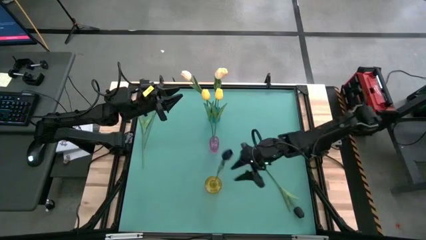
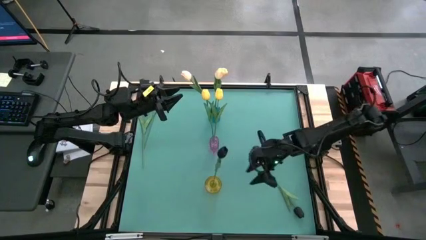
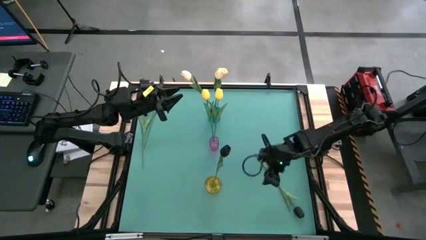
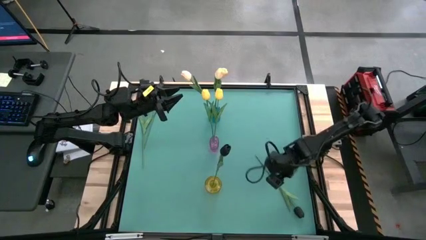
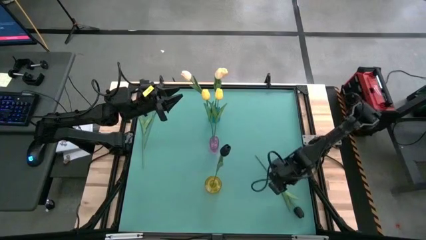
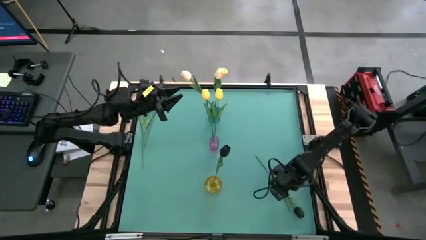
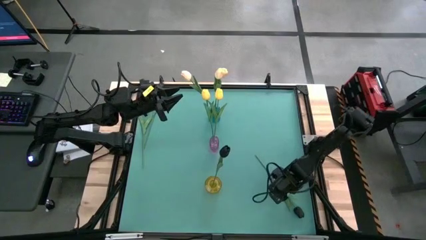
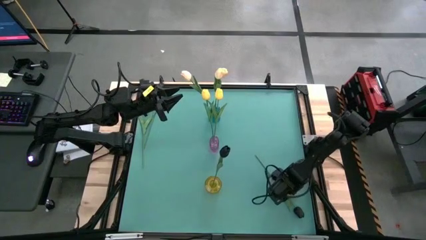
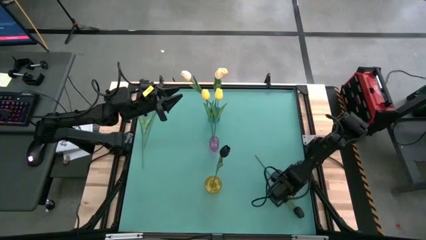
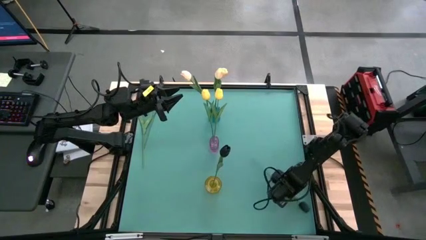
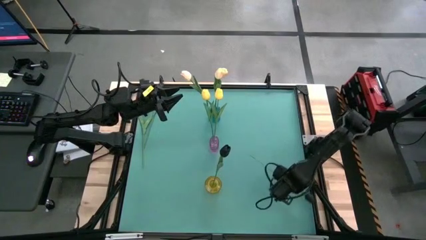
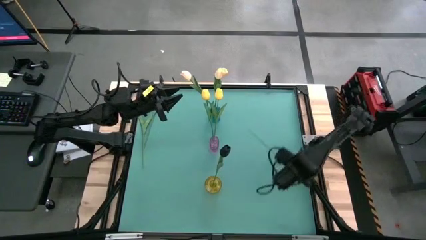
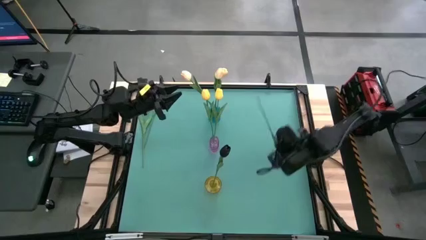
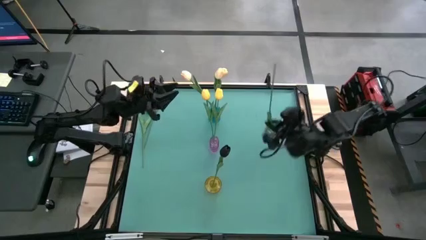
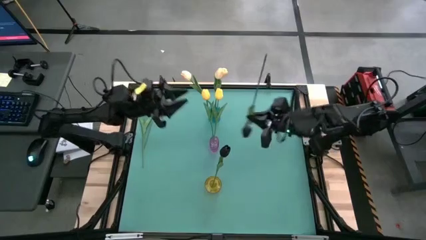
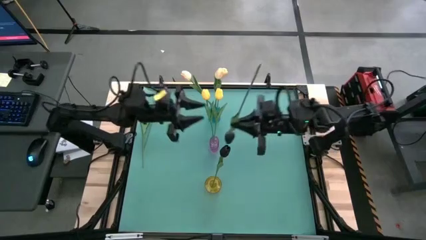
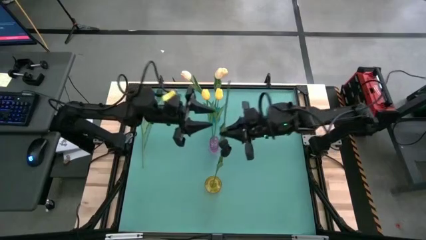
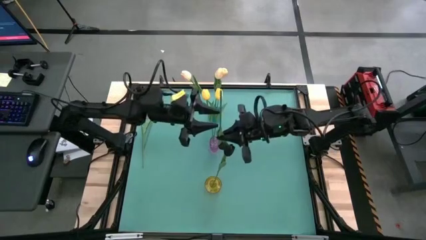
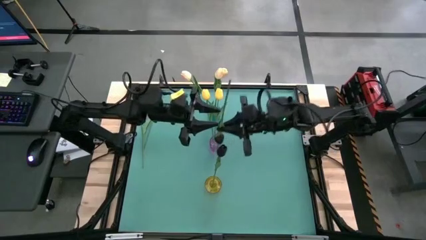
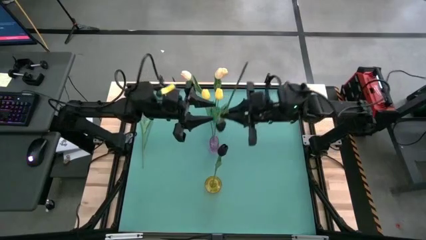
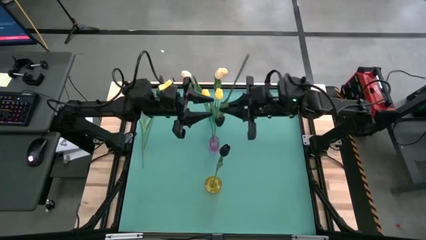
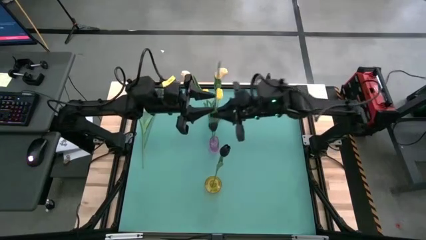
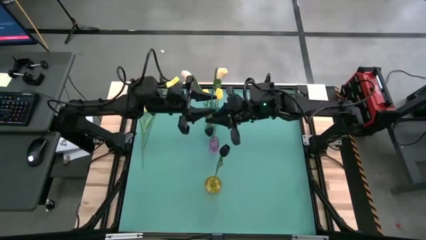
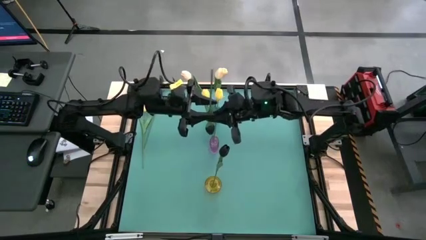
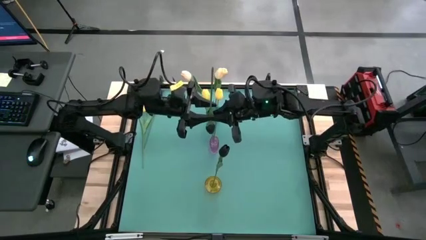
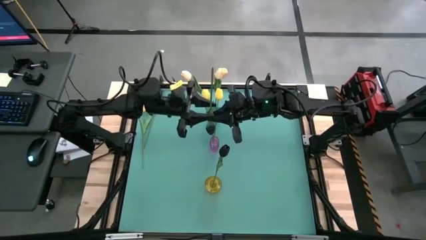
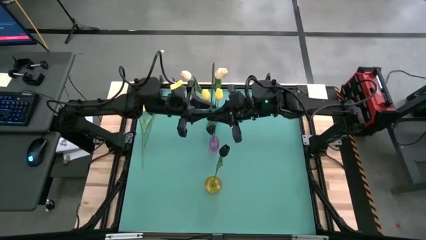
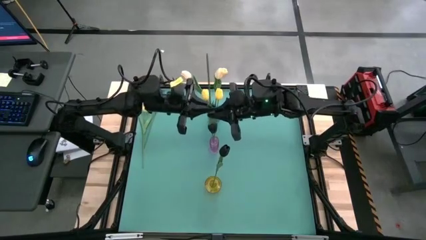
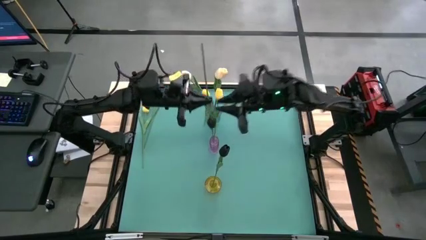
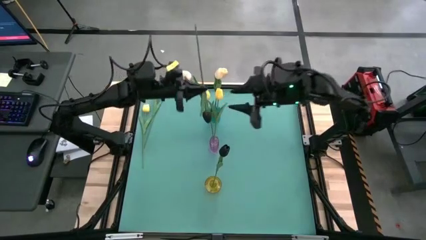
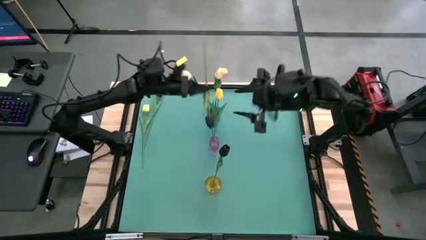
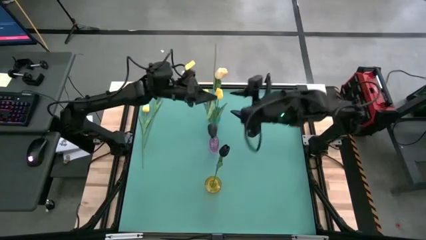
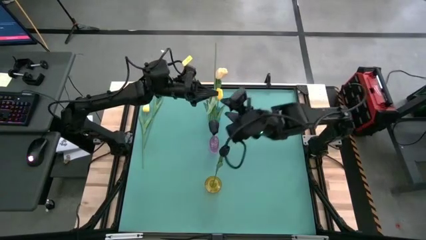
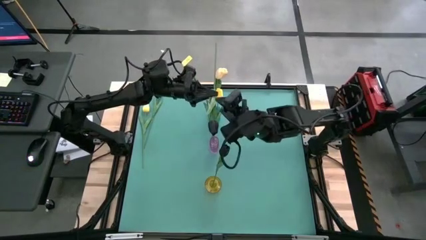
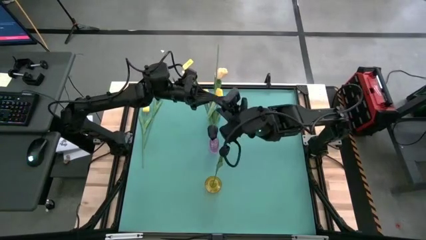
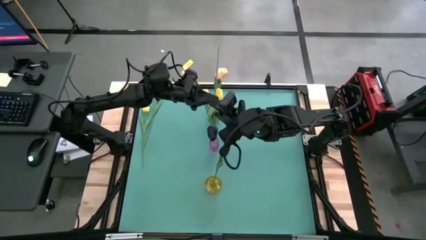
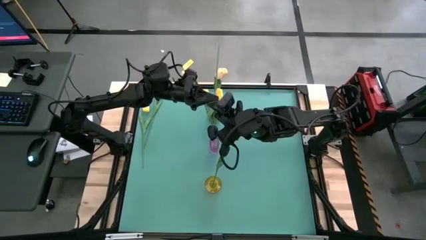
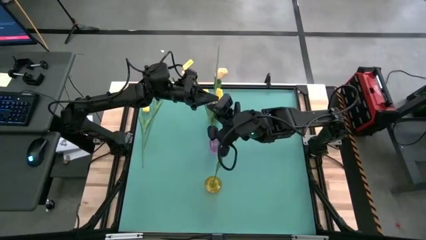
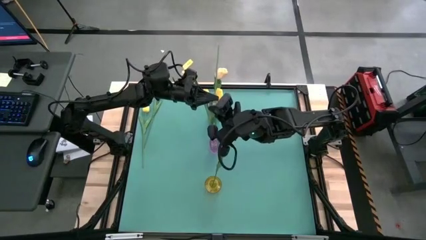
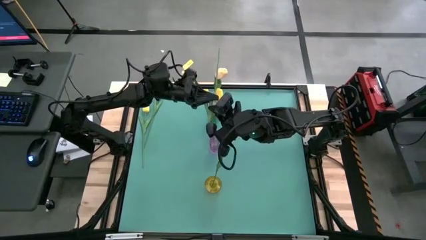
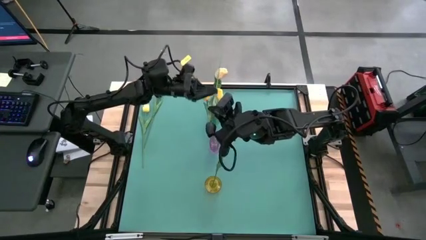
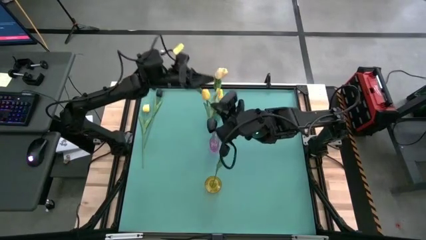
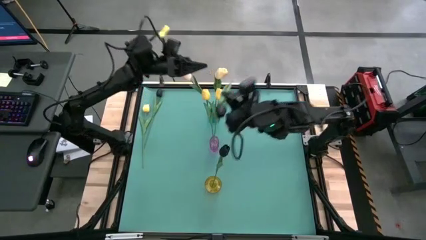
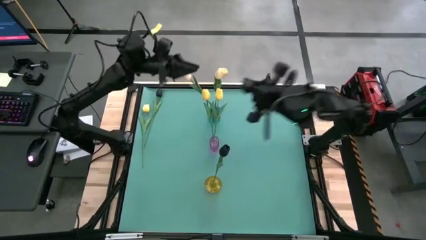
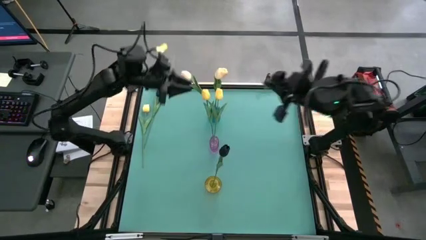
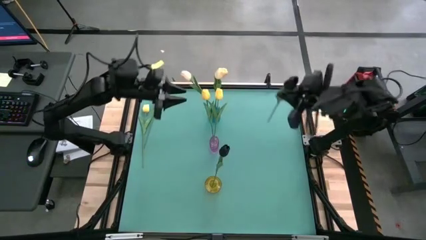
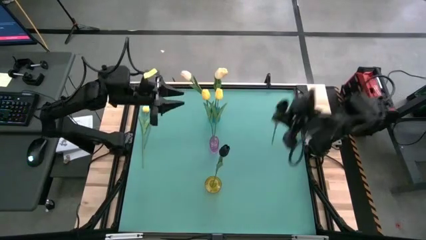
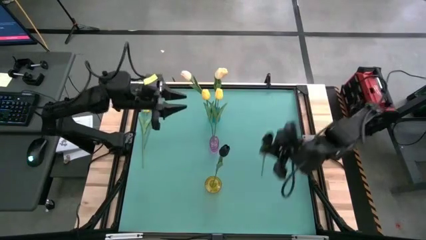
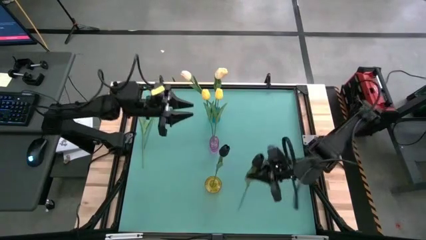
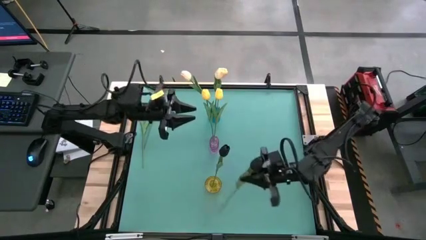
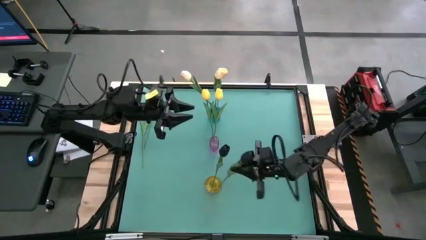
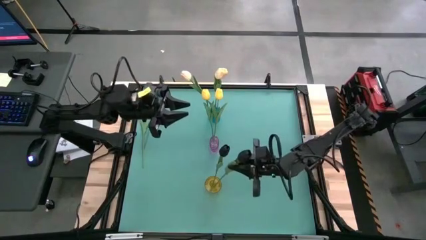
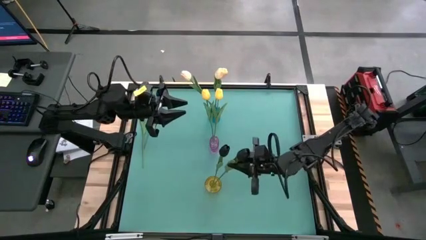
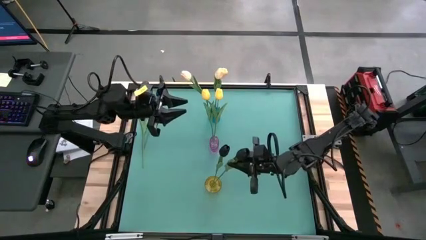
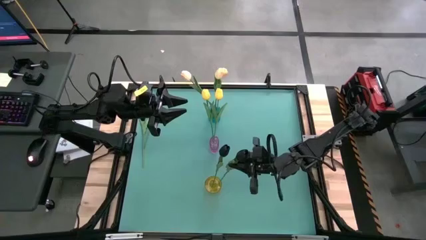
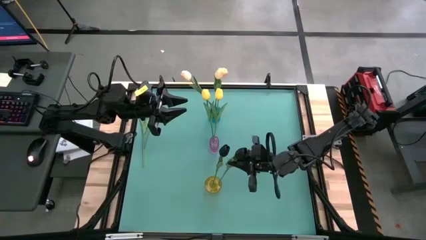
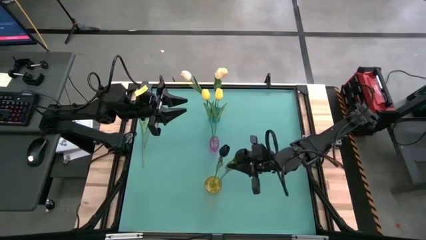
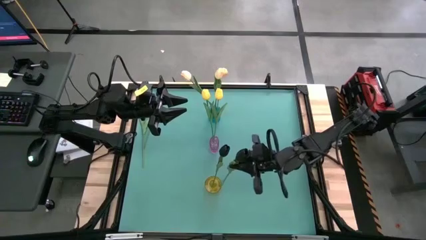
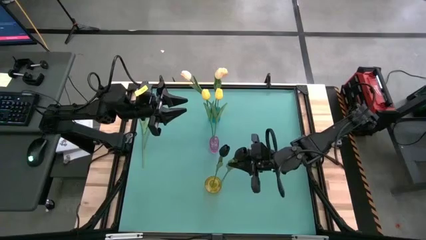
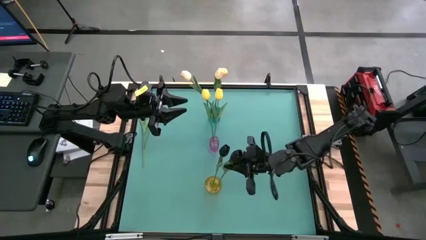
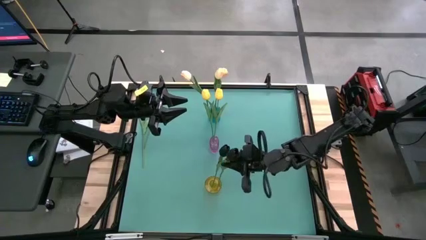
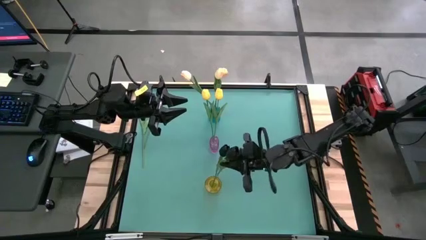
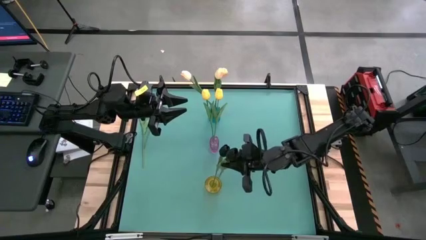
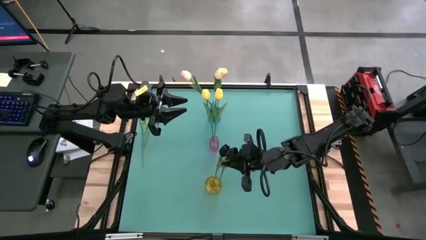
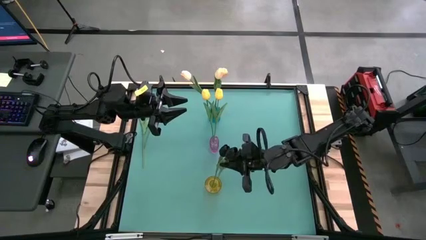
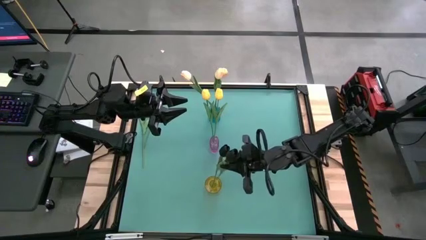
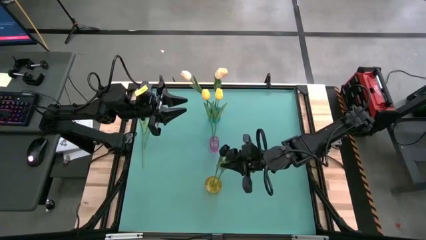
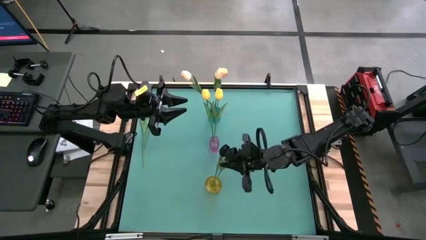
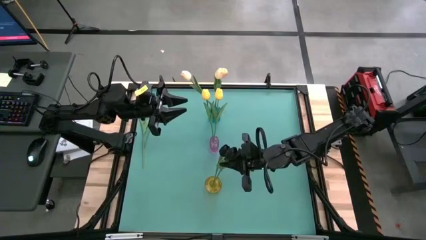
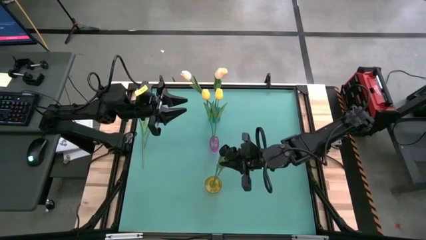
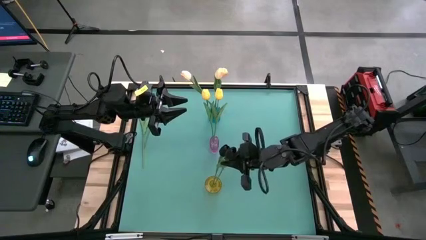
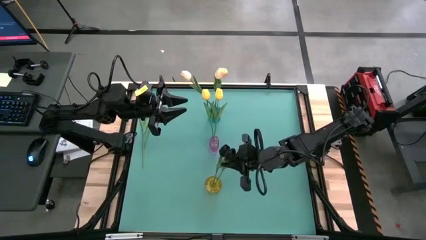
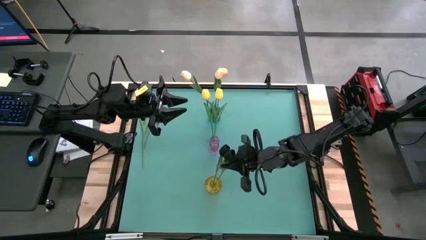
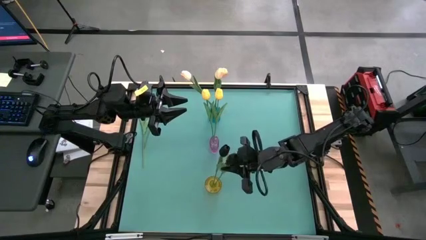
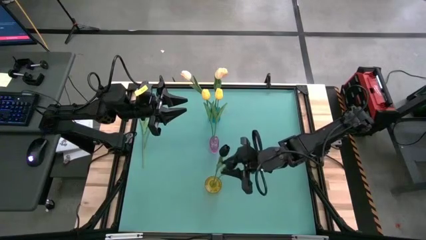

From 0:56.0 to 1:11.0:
Task: Sort flowers into vase by color
Put the bottom black flower into the yellow vase

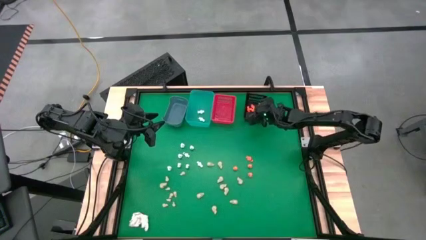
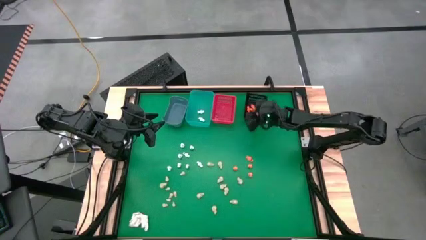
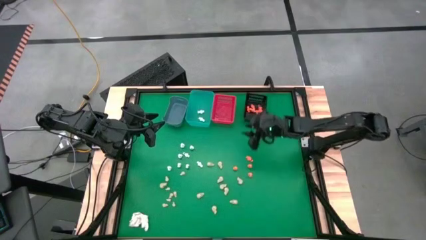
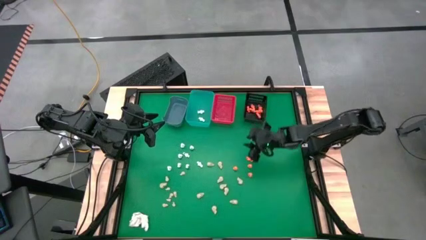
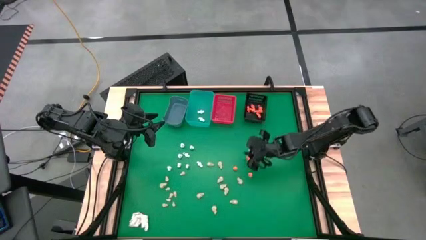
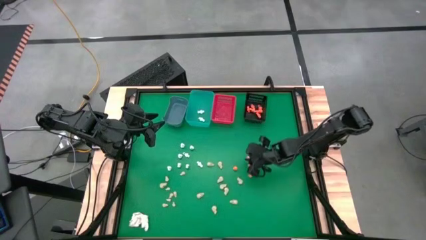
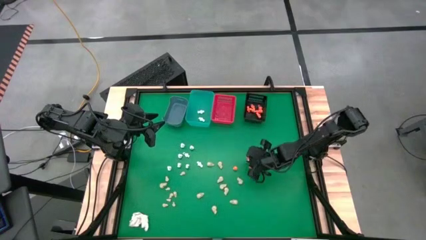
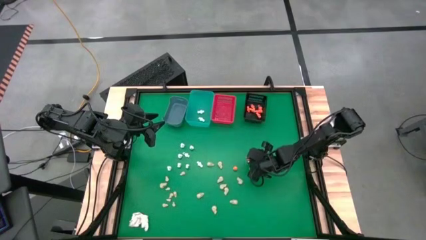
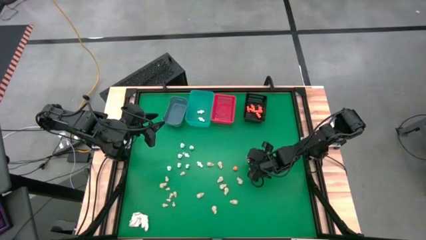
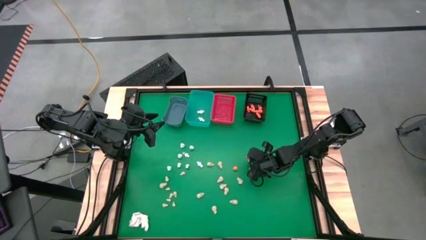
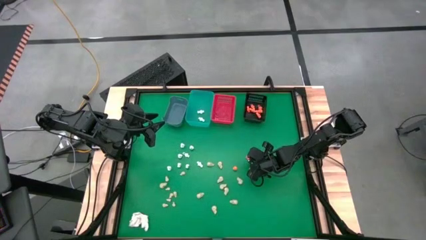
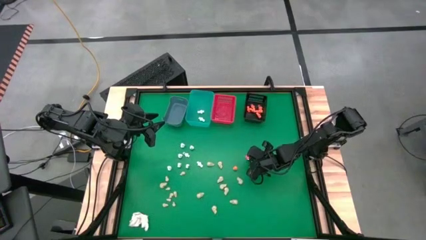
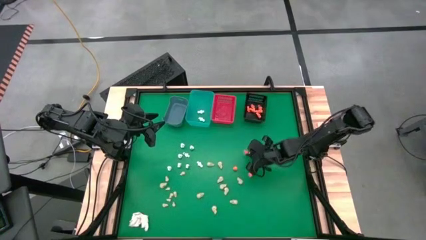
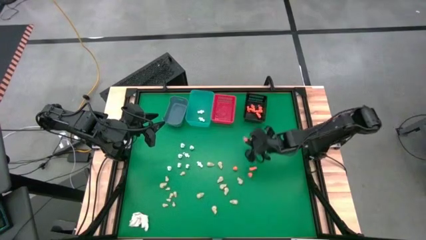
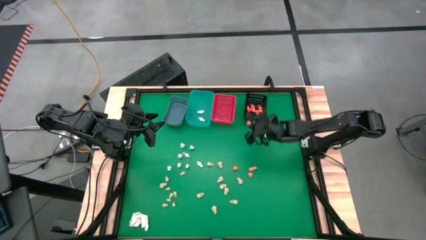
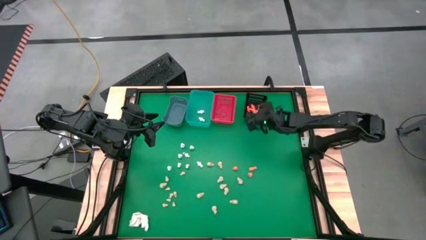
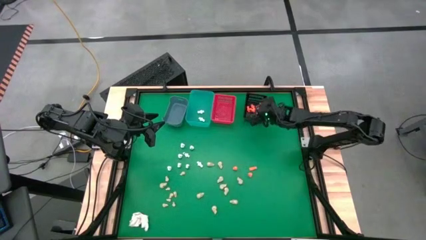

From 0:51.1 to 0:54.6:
Task: Sort Halloween decoration
Put the orange skeleton toy into the black bin
